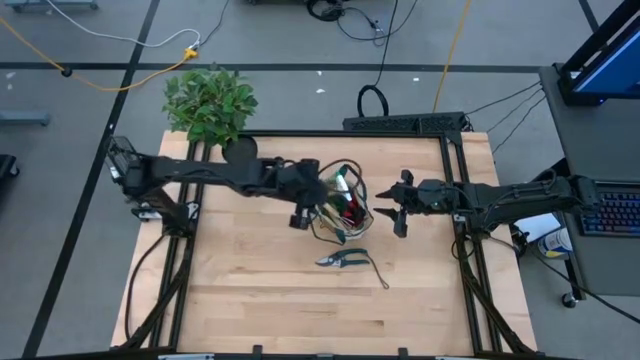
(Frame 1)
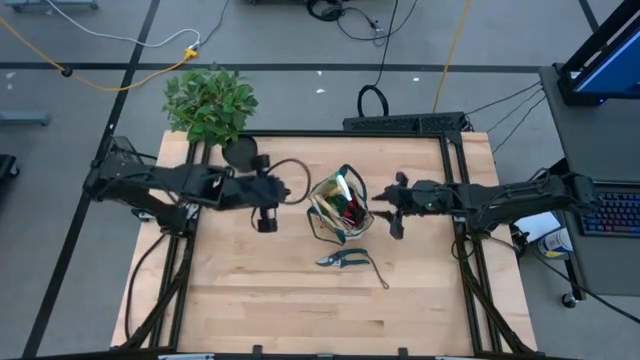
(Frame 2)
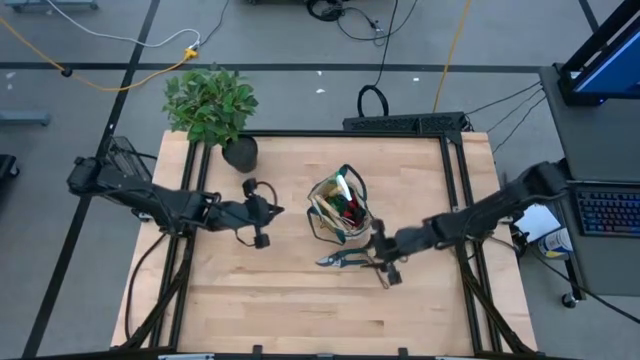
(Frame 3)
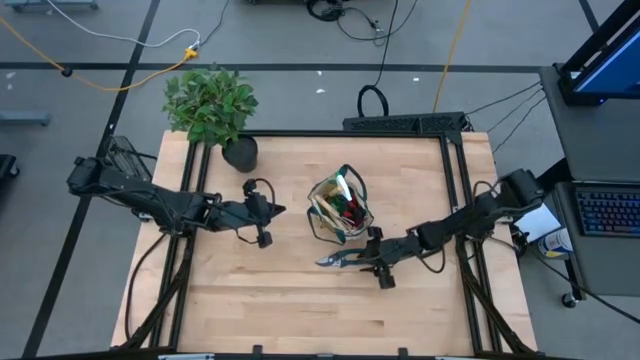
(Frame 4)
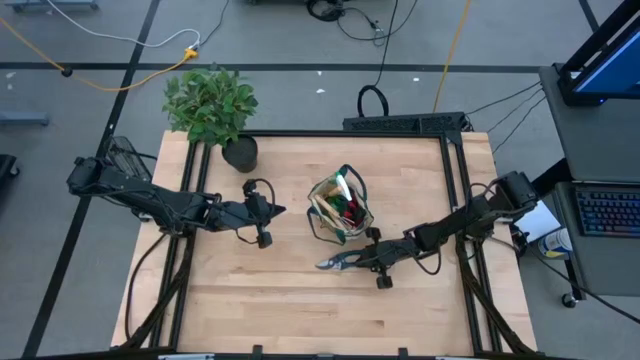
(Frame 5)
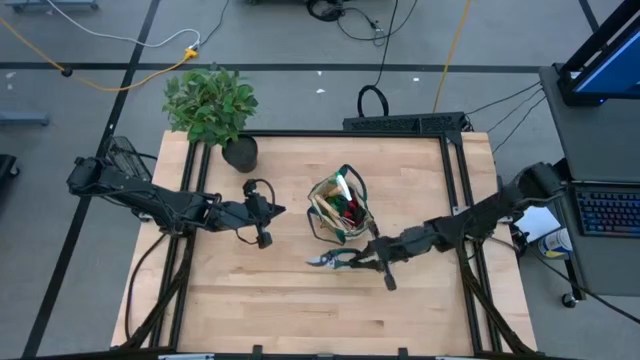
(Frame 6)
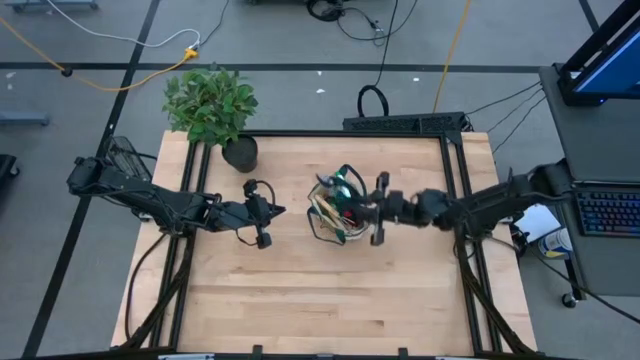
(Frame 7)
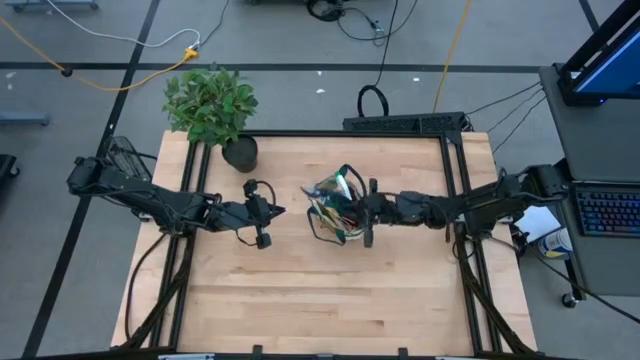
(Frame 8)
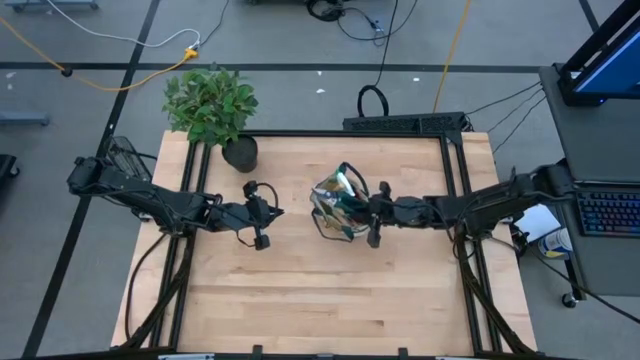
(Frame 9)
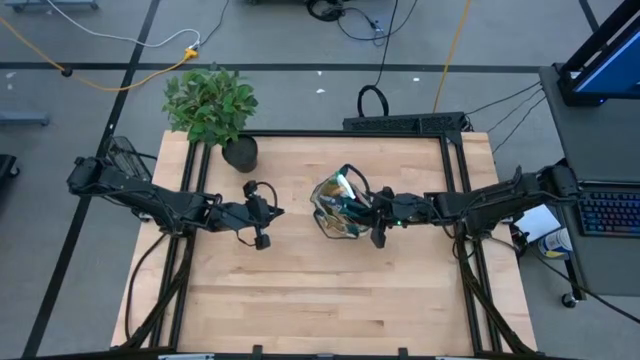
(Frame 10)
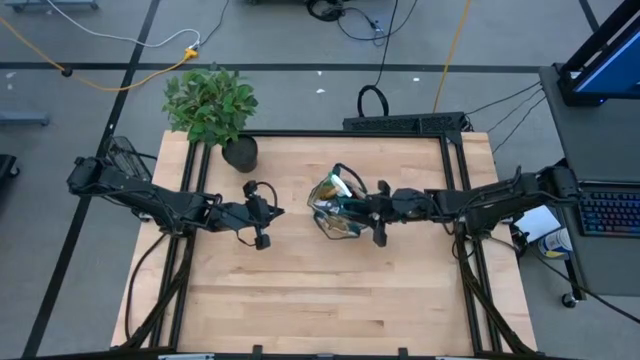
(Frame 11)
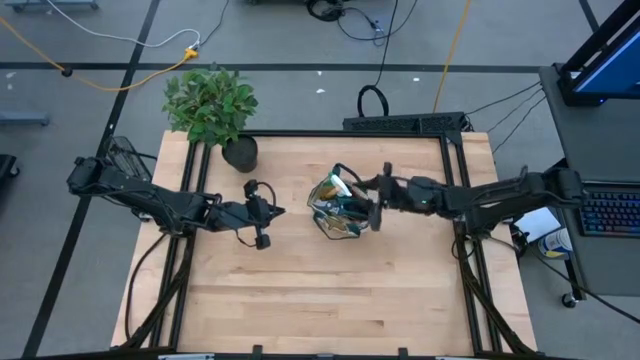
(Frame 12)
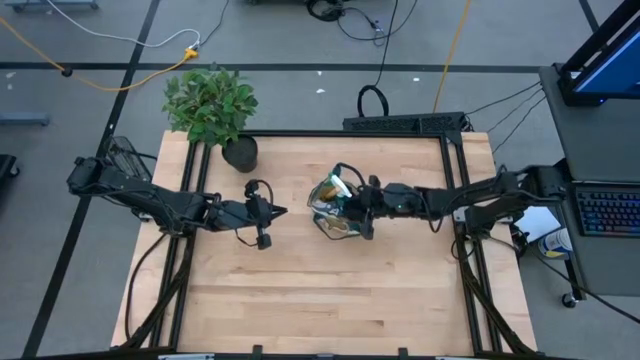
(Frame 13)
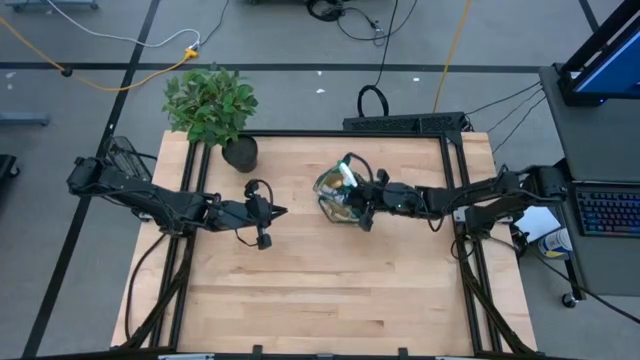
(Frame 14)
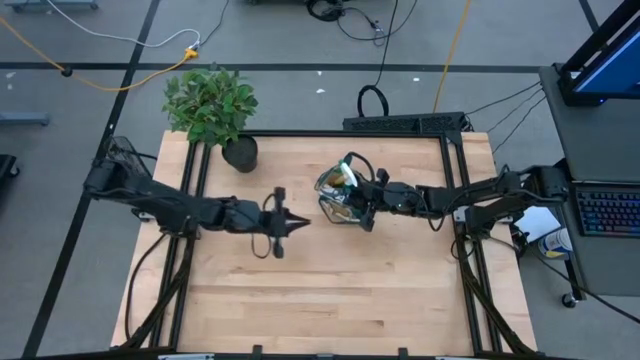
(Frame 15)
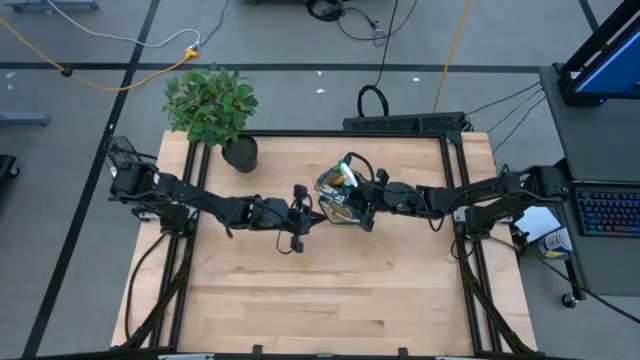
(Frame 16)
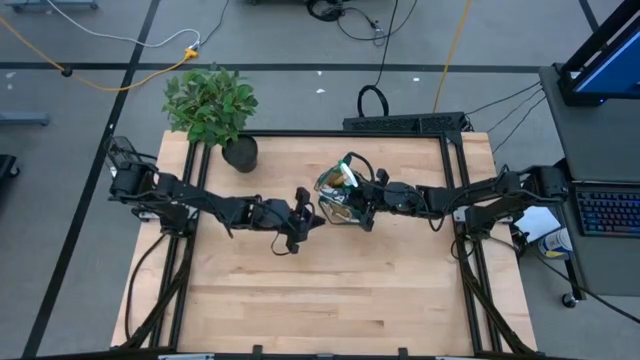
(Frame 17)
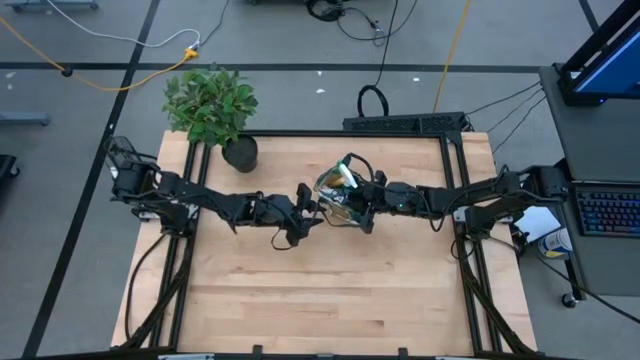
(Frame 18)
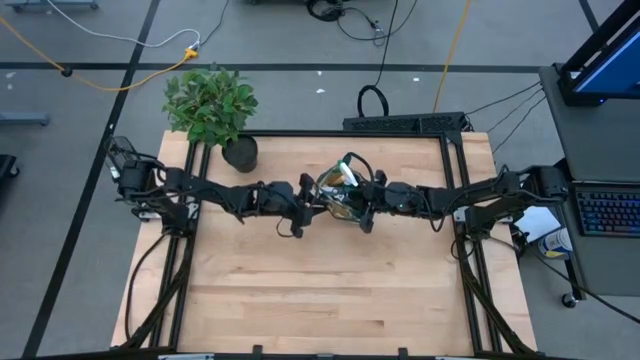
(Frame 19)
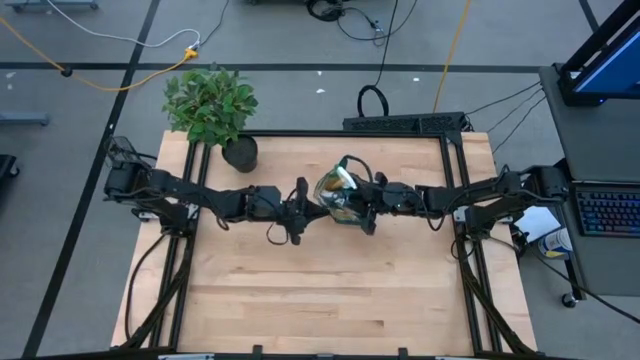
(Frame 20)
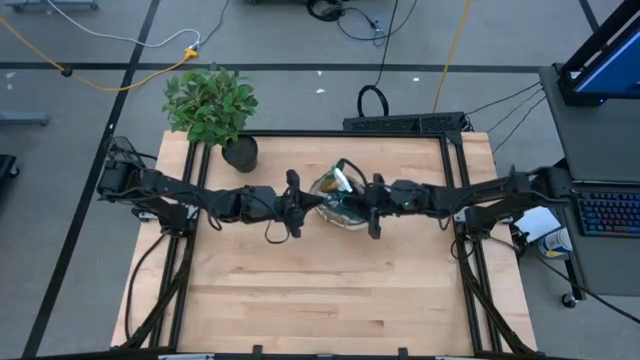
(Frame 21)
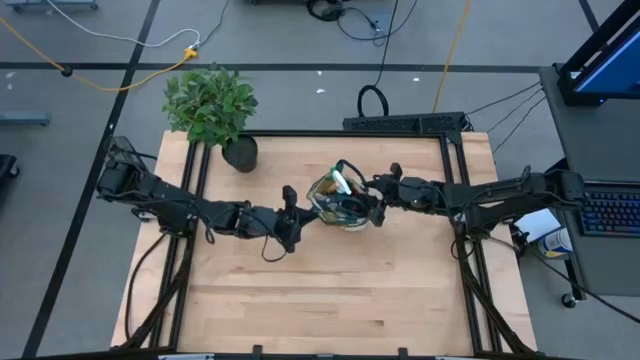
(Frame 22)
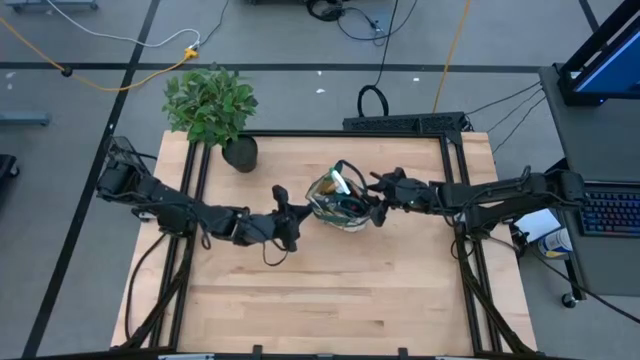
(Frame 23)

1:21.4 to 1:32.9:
Task: Pick & Place Garden tools in Gardening bag
Put the shear scissors into the gardening bag

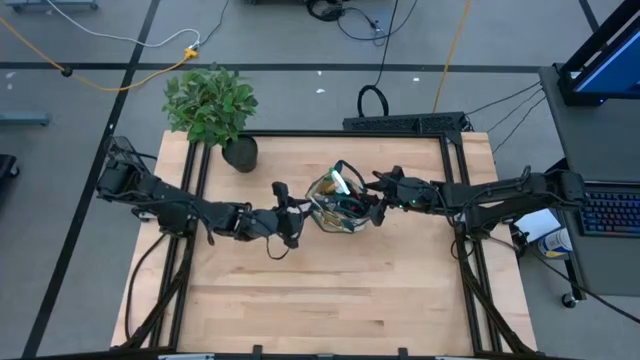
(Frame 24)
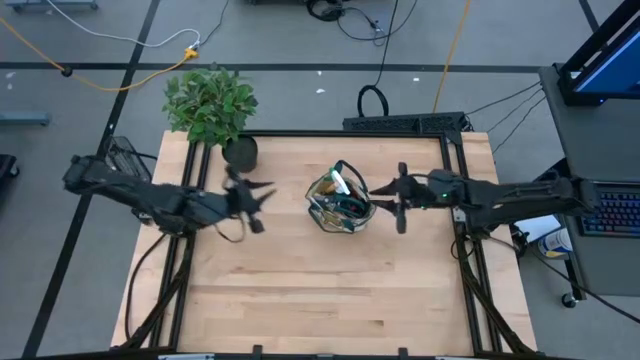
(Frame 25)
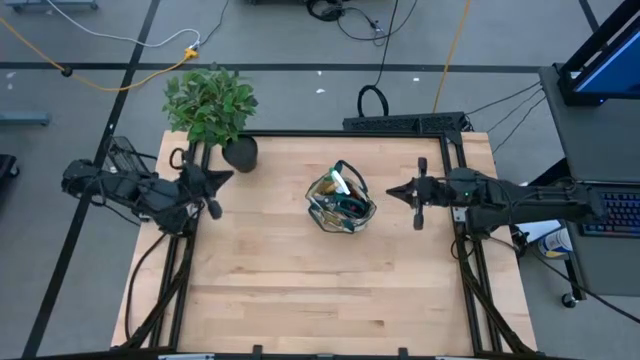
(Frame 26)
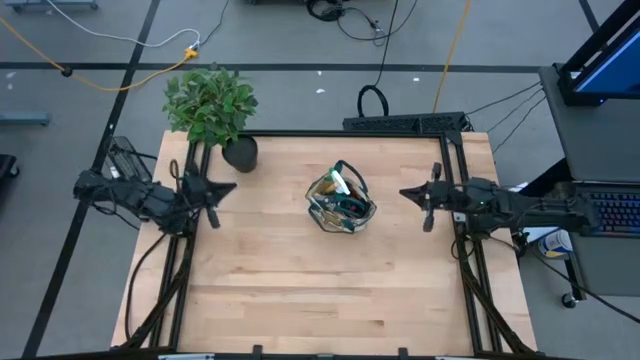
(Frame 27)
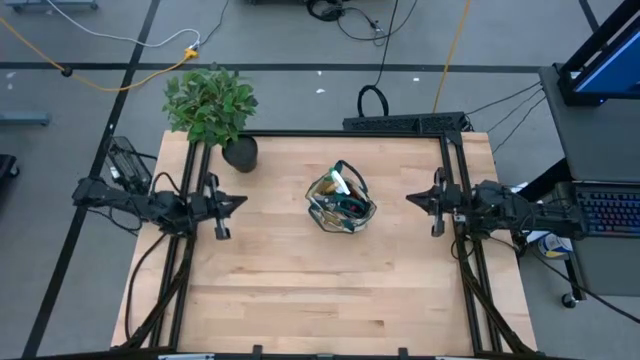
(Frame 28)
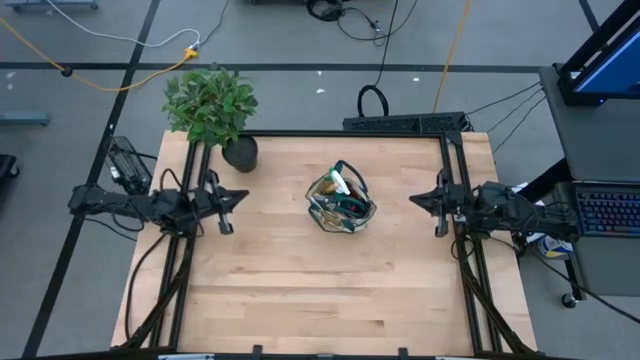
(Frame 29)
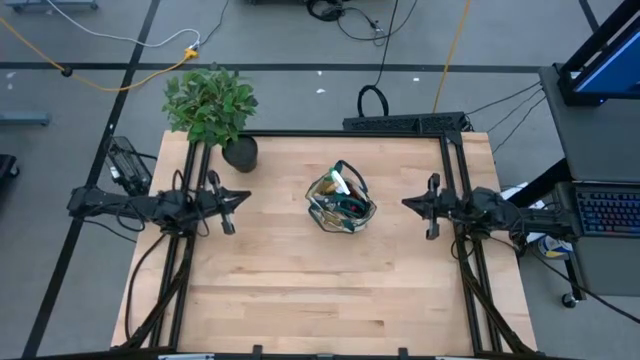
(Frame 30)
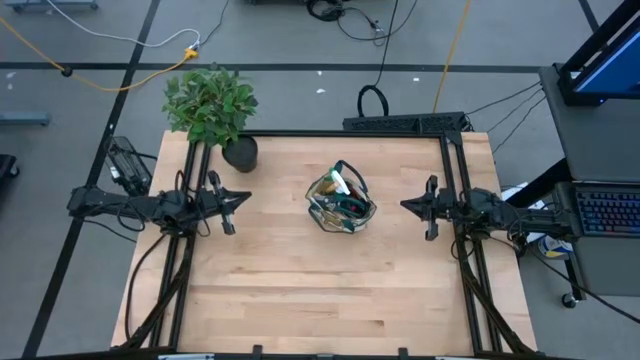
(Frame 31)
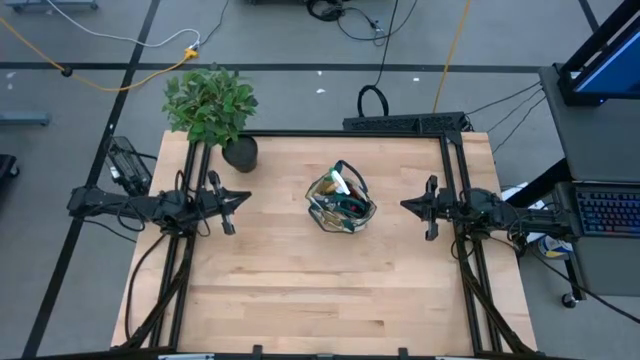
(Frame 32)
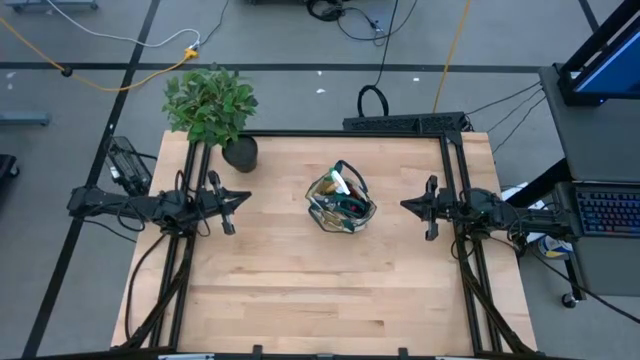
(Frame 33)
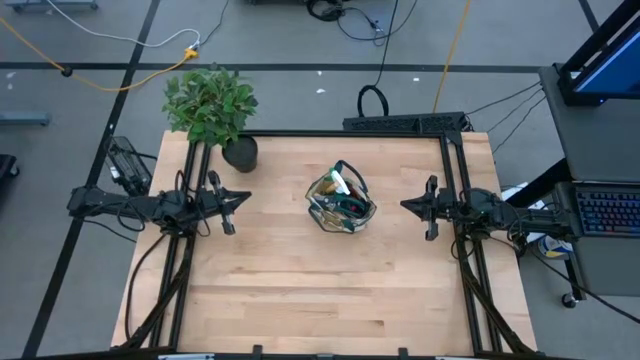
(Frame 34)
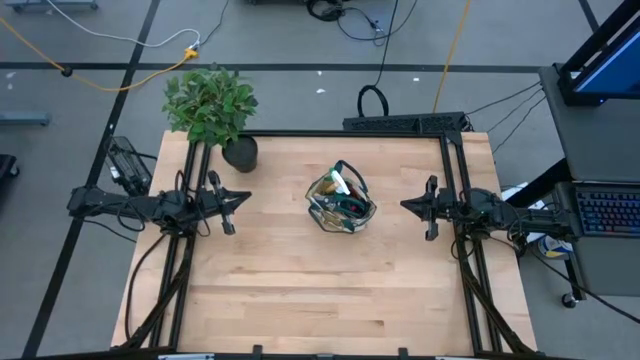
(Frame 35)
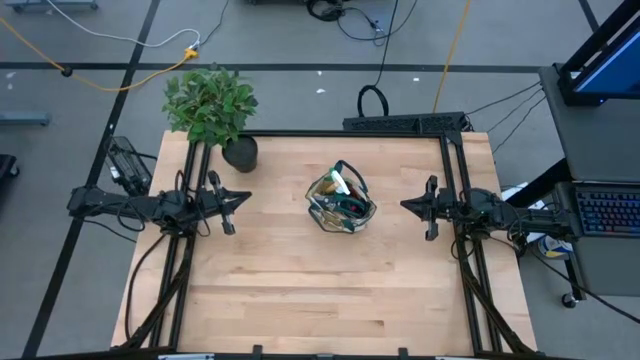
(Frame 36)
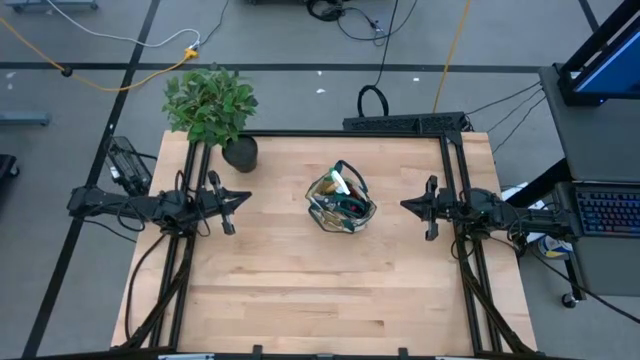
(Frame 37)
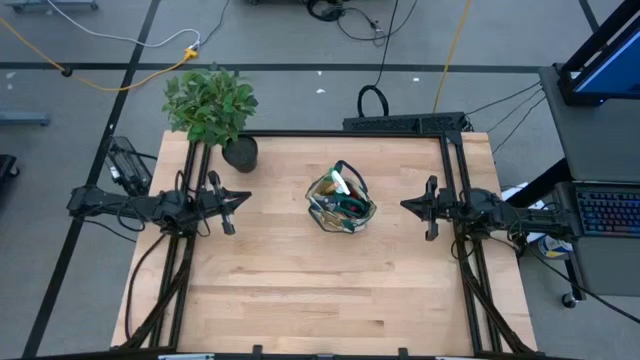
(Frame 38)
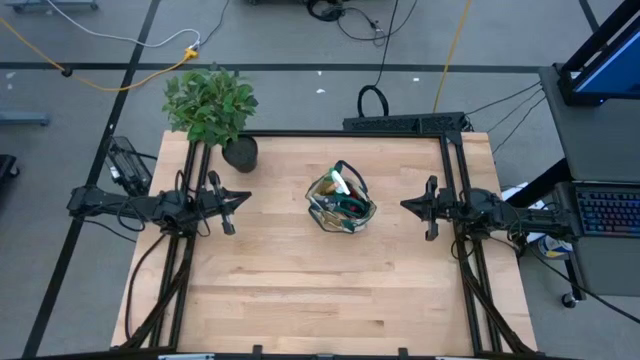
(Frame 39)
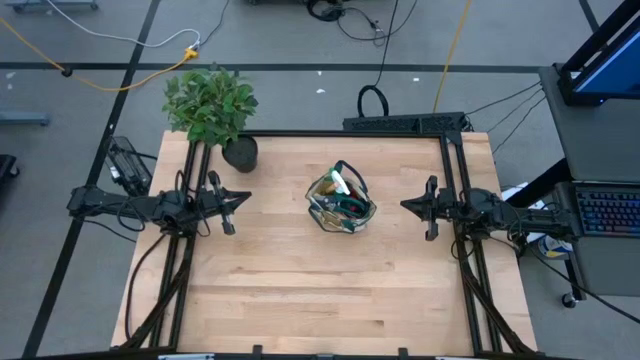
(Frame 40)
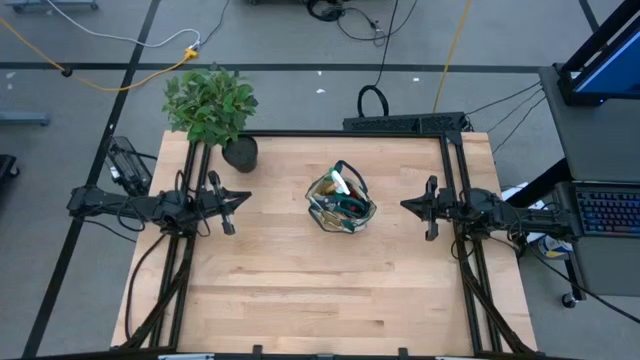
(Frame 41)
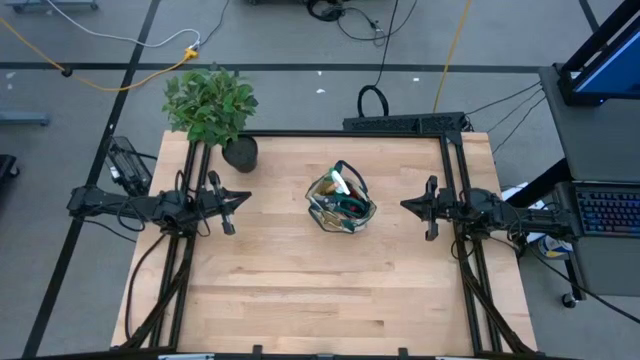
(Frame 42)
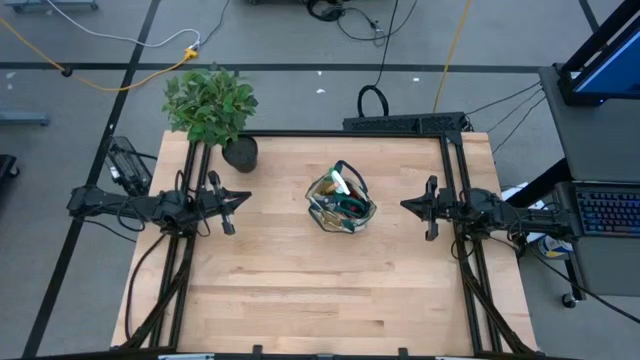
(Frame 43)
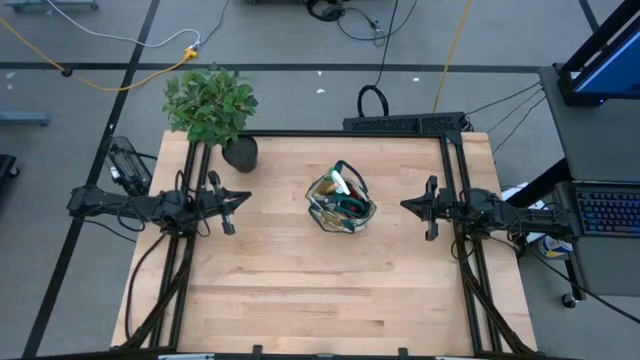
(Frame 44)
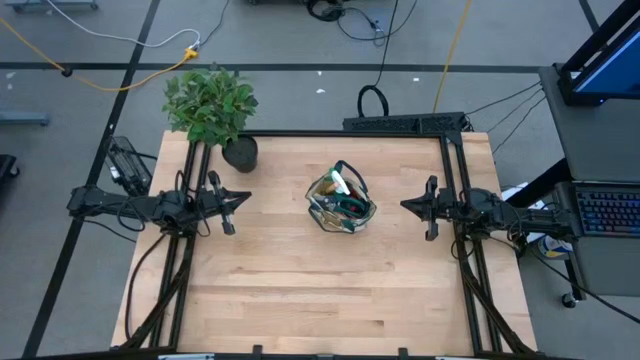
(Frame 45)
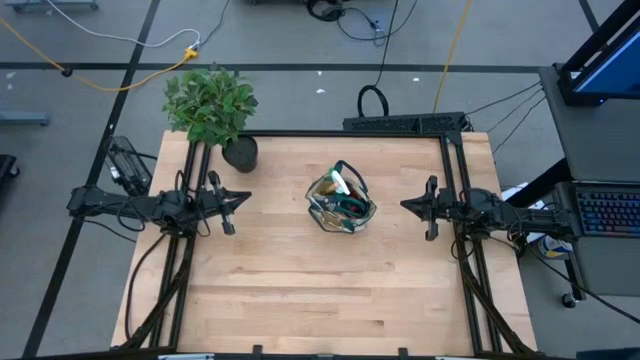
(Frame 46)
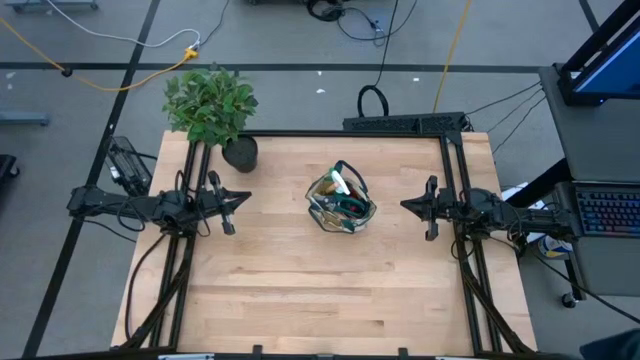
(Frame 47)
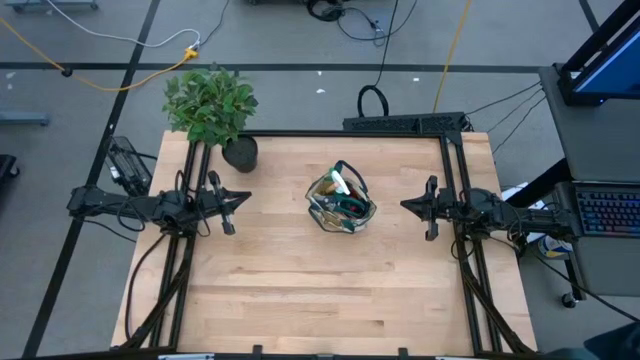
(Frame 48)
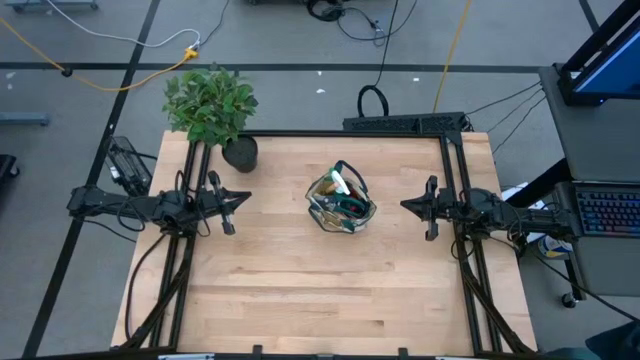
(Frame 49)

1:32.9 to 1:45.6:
Return to Home Position
